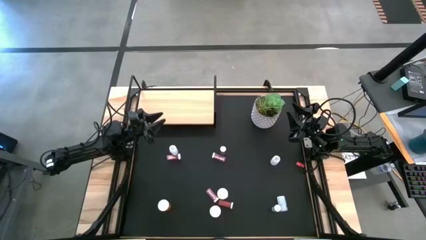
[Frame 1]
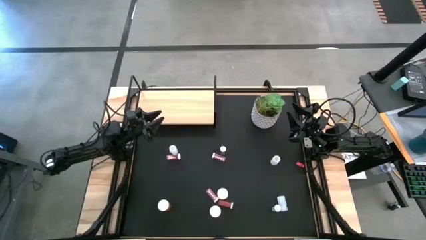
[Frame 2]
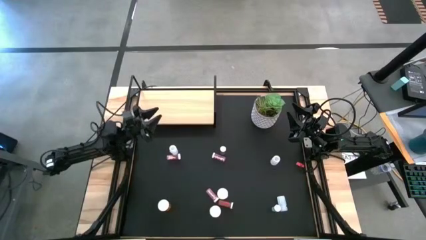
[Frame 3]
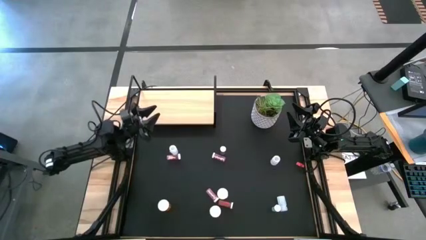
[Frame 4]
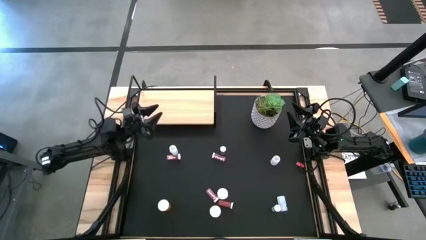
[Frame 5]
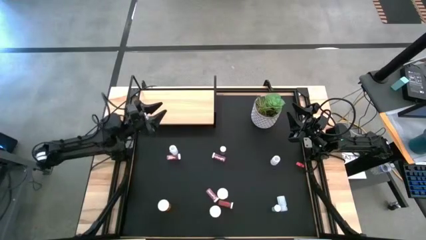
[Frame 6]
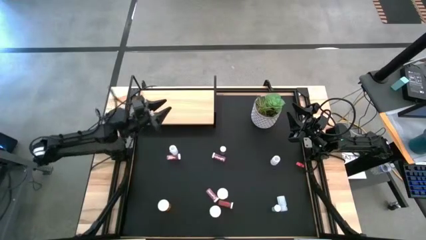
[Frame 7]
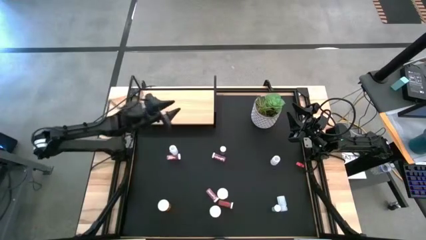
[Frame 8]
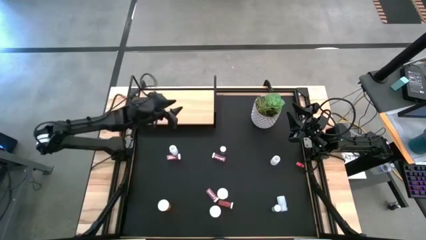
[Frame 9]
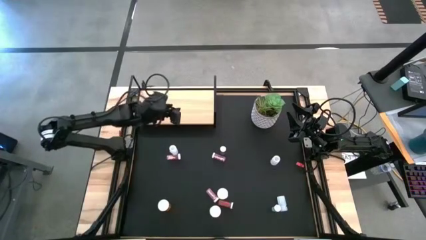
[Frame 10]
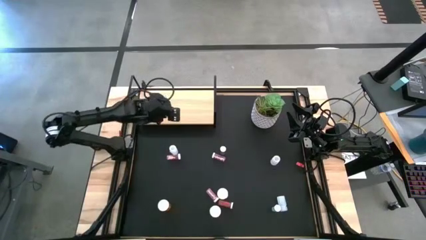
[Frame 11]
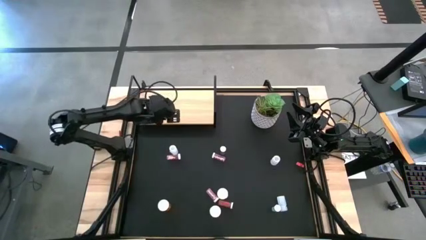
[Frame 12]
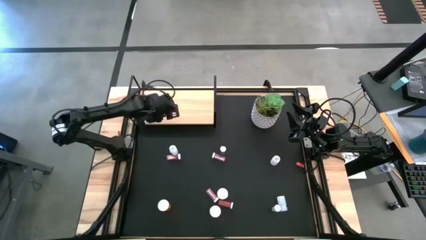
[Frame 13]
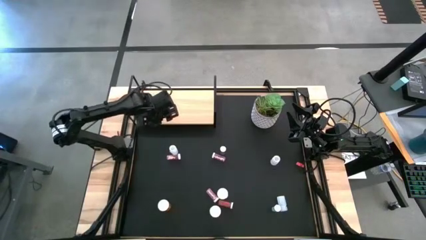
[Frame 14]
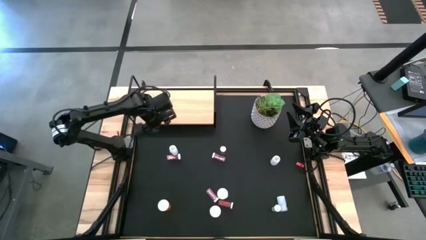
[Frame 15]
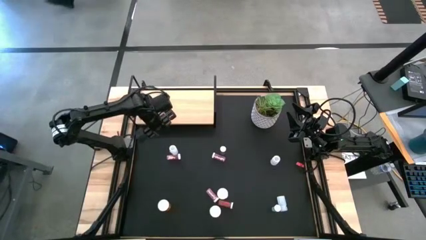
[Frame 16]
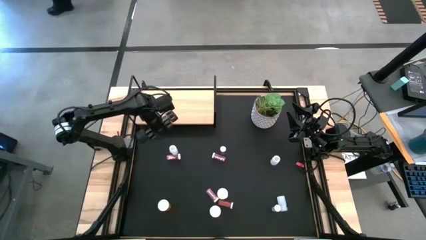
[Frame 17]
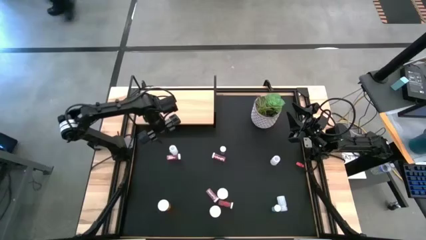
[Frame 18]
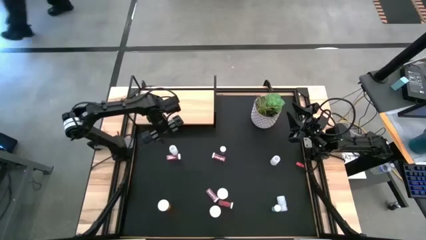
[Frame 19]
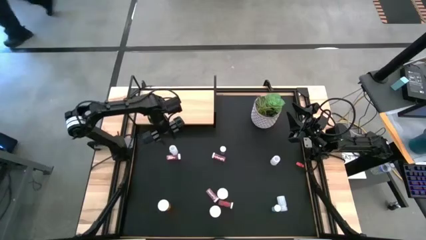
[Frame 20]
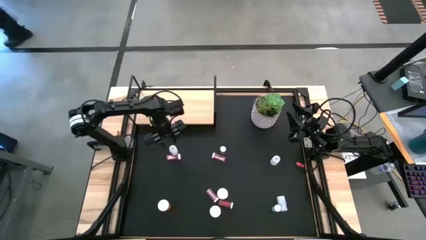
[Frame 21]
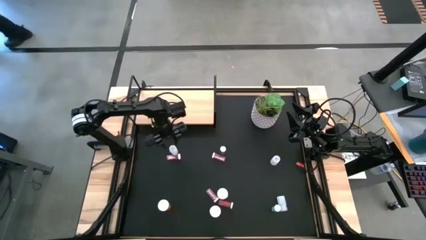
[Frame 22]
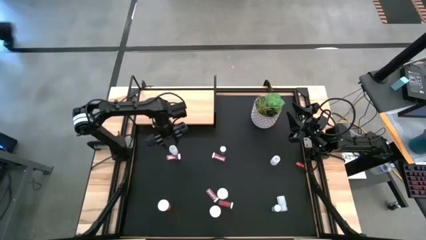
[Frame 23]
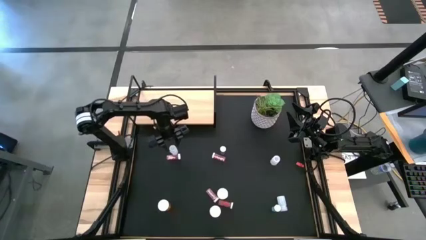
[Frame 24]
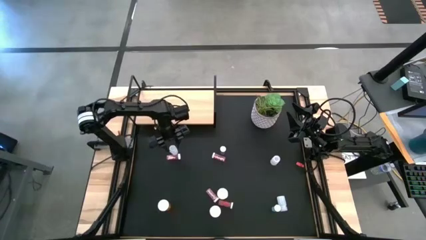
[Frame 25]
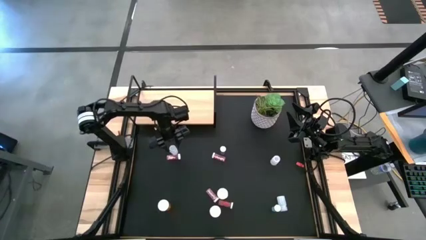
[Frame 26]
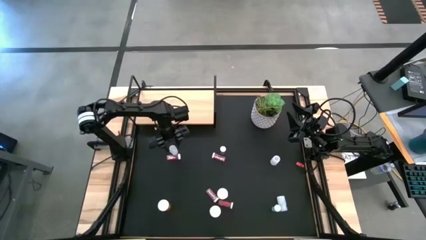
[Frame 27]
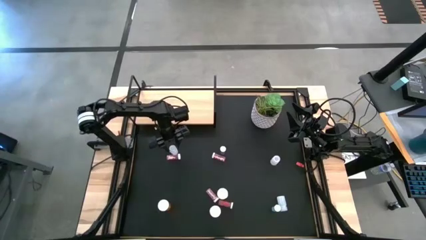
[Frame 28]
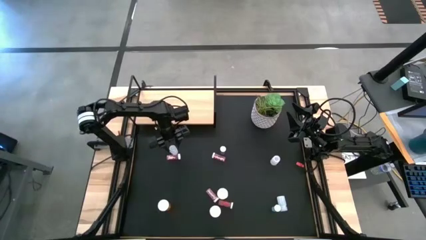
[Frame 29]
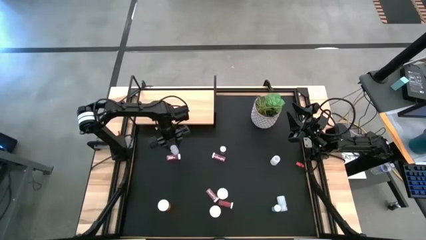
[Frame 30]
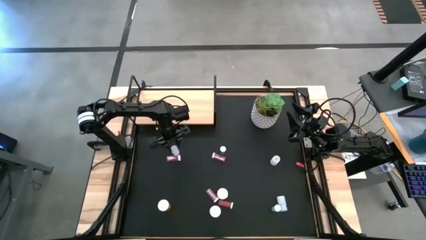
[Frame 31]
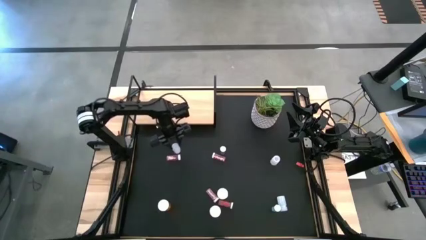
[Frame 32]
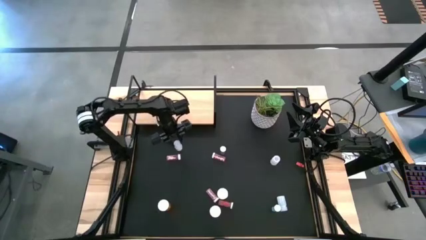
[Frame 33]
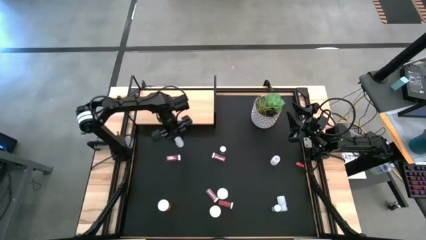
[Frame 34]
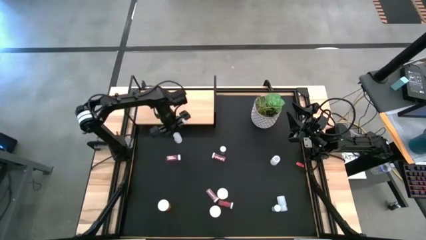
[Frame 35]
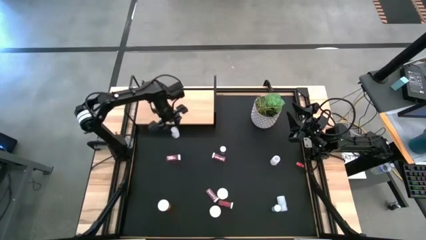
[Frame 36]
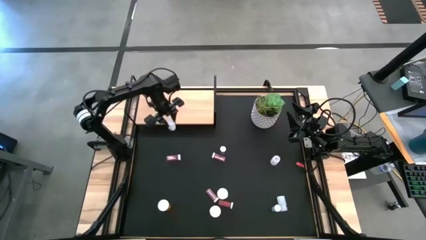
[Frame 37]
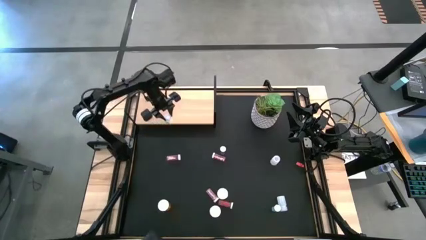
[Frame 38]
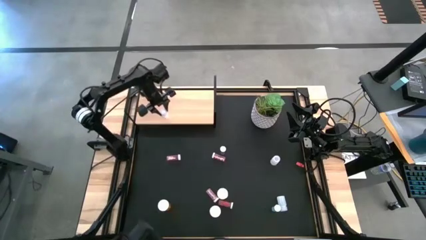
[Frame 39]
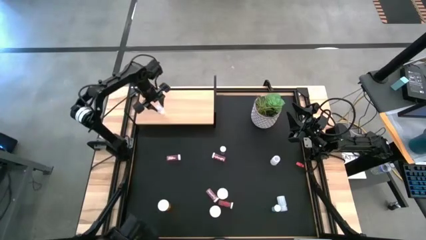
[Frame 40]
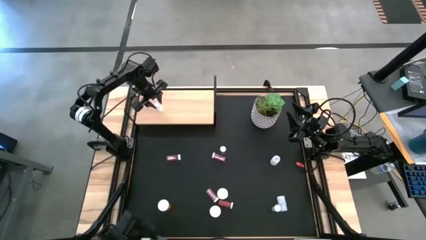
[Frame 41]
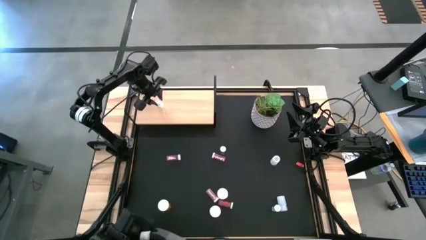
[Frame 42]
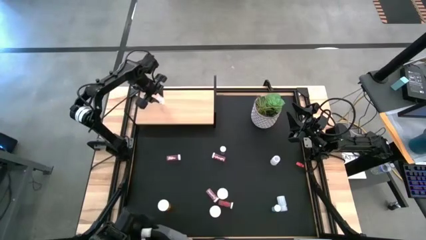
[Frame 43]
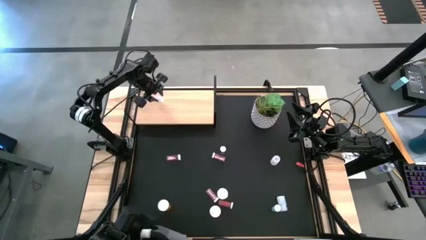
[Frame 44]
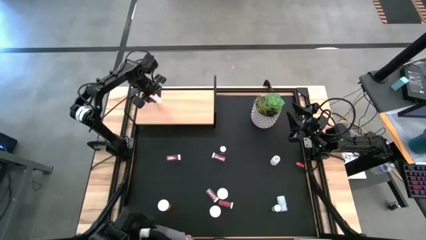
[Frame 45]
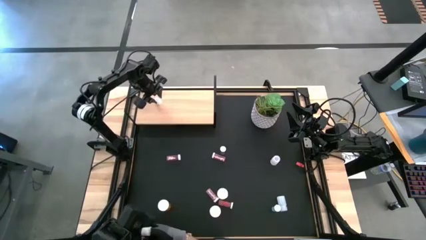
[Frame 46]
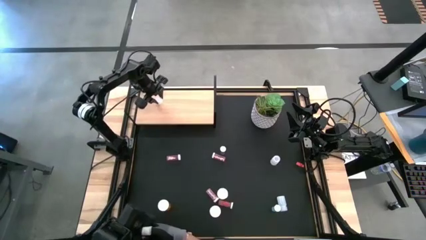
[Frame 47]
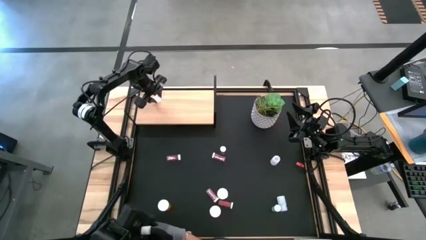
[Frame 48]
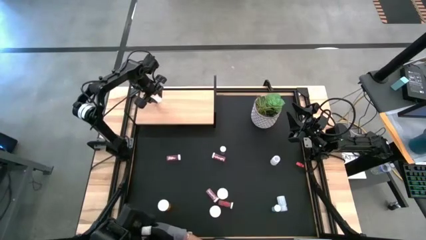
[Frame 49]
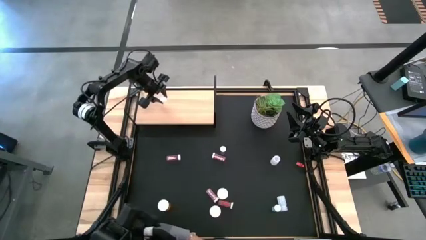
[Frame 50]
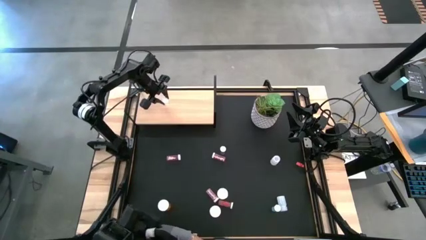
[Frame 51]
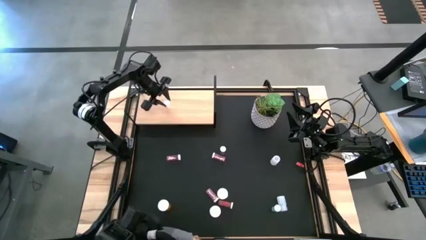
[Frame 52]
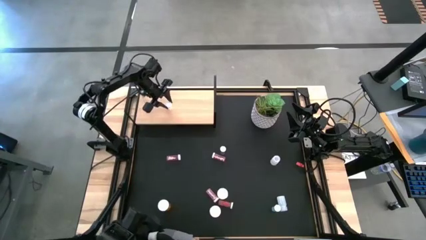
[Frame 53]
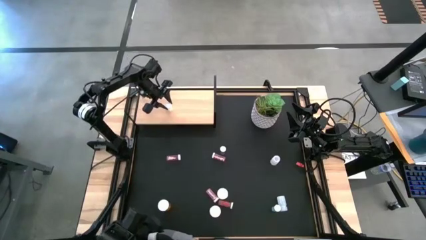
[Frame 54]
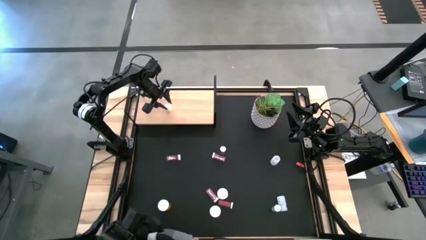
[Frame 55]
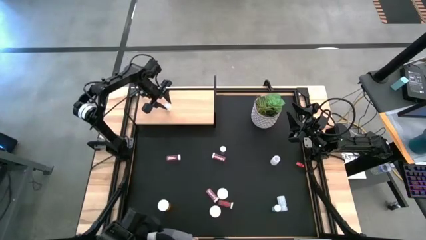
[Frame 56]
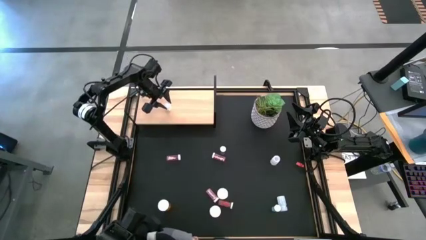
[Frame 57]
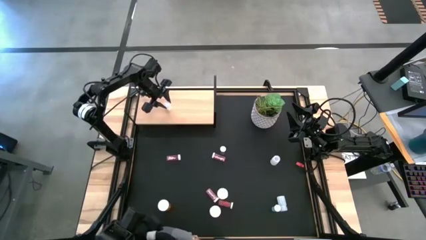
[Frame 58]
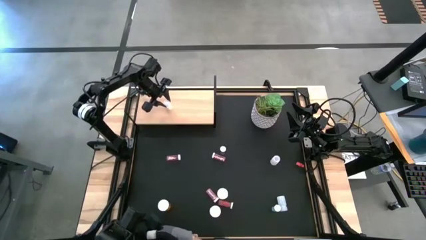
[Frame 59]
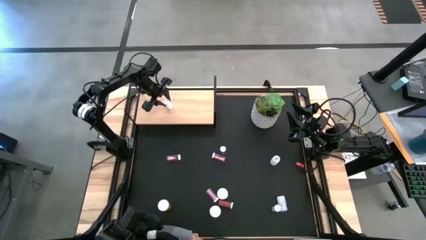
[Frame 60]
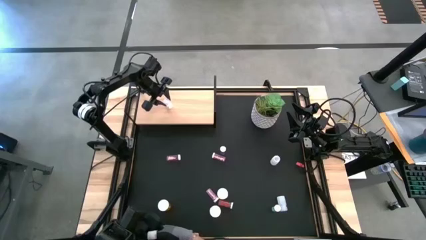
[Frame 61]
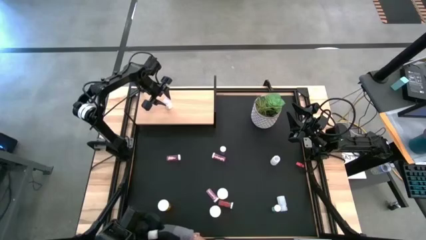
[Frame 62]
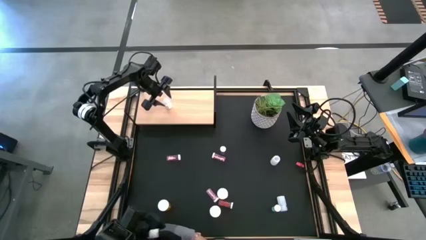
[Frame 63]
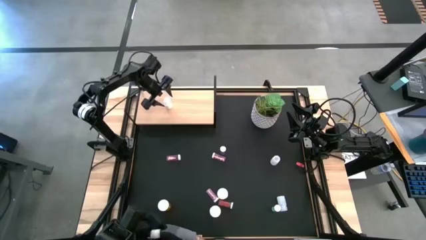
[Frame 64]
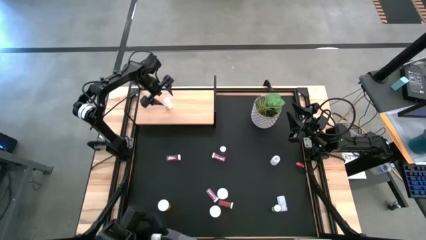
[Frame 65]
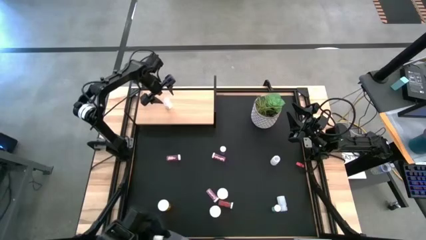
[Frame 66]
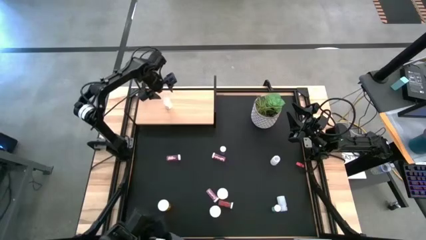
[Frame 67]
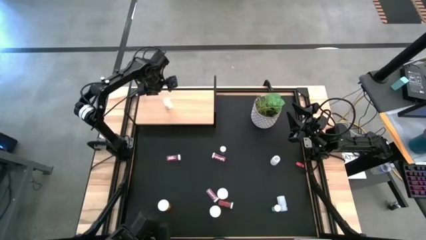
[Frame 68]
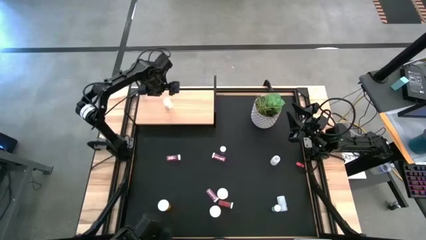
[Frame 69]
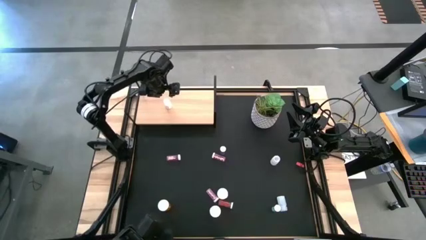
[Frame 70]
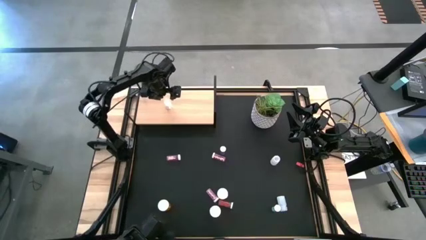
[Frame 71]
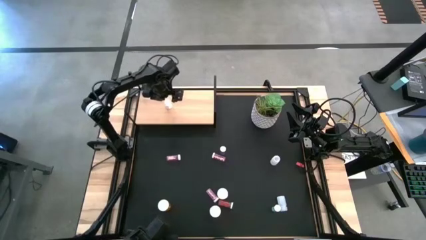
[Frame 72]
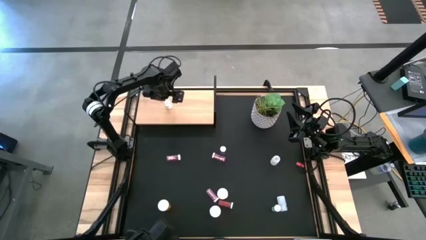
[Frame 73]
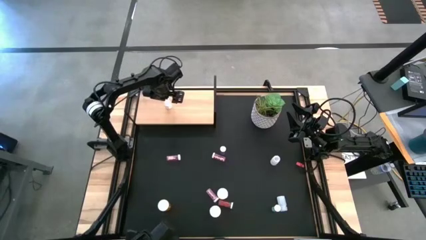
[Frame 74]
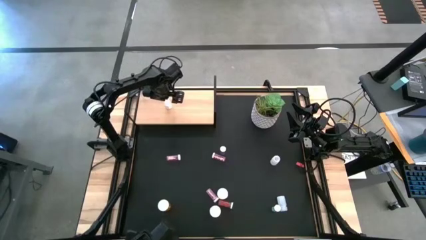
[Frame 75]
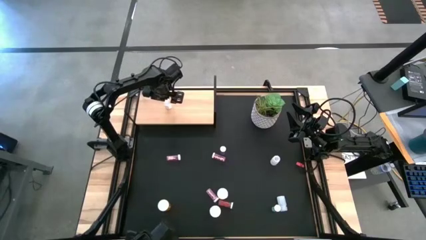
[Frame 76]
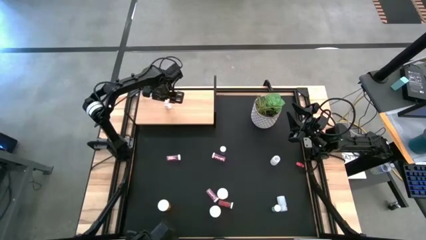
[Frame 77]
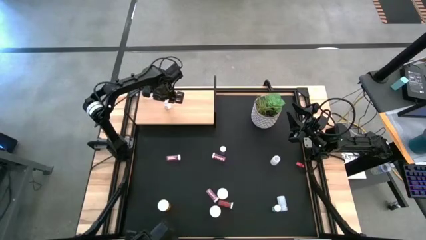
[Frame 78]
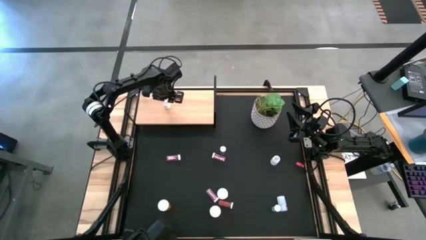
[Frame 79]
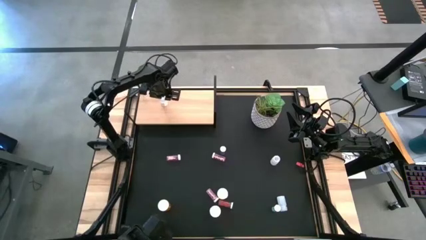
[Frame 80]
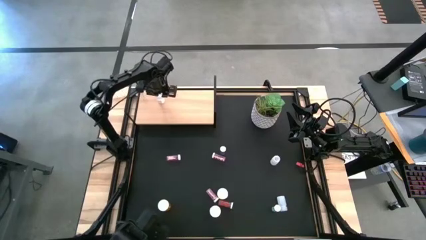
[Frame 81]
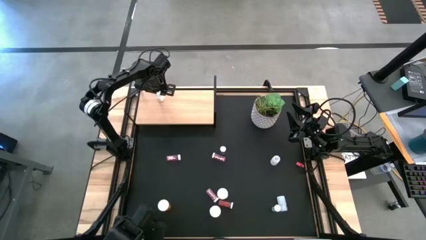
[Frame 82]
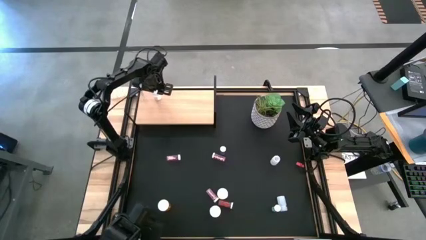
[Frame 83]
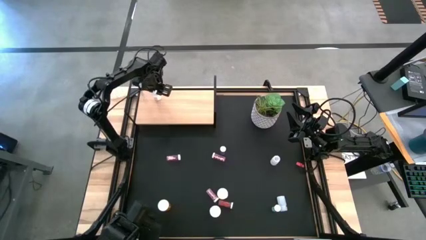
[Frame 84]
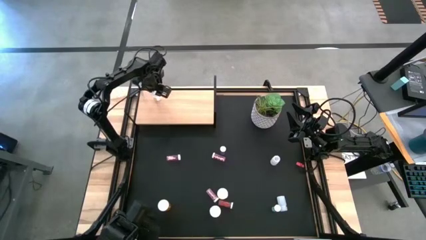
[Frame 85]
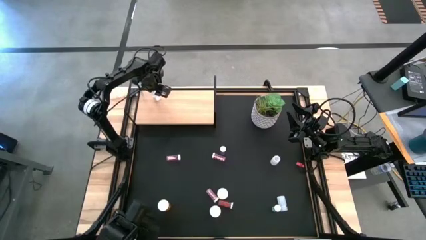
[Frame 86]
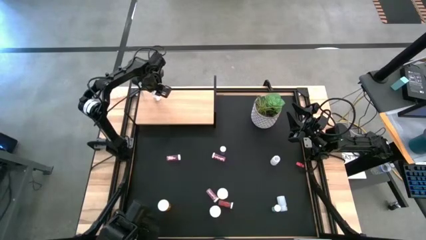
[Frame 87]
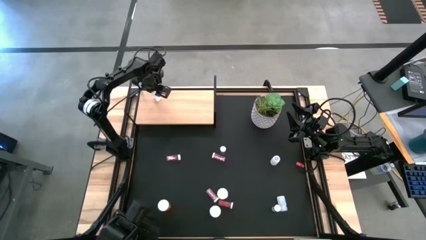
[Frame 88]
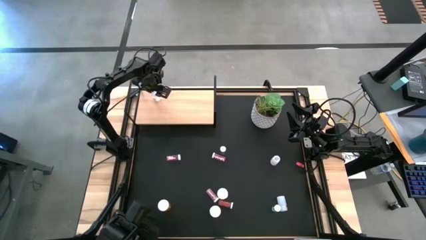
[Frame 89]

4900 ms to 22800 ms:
Task: Pick and place medicine bottles onto shelf by color
Put the top white pill bottle on the shelf
